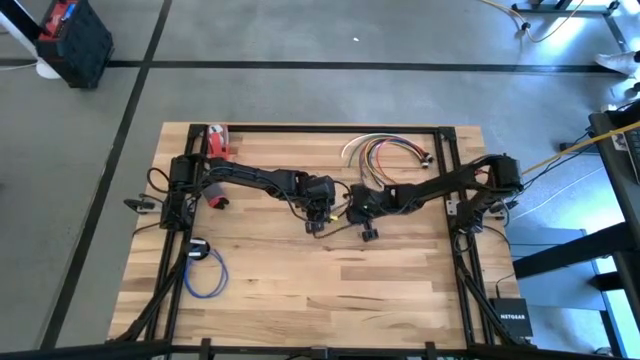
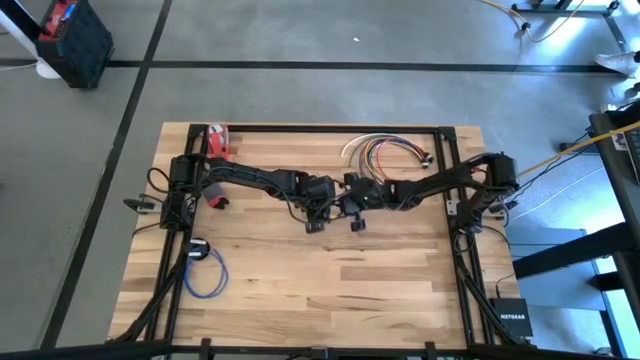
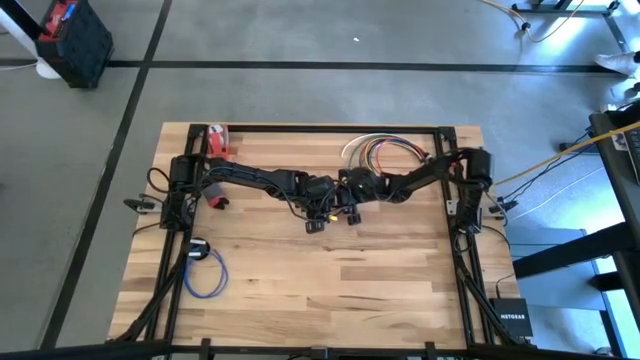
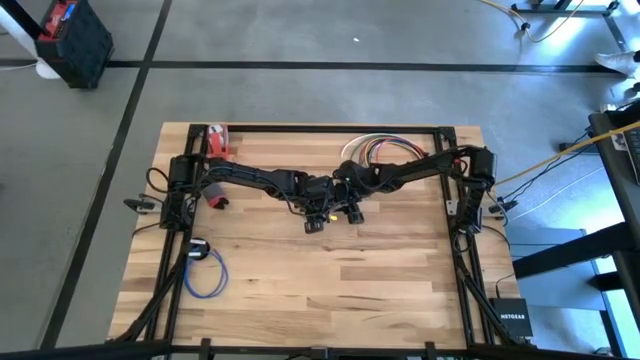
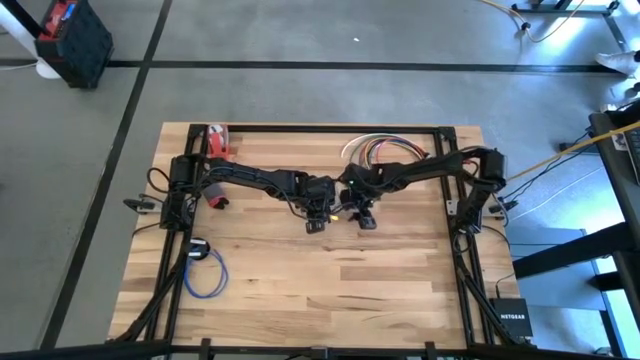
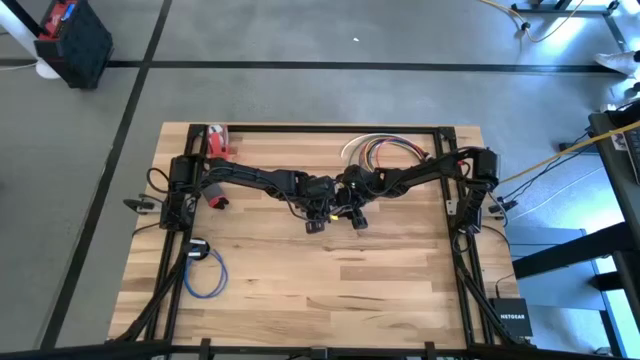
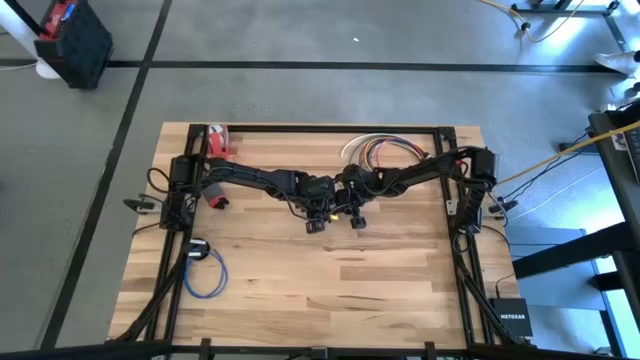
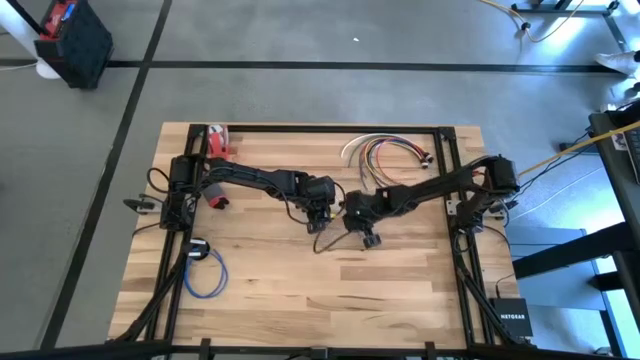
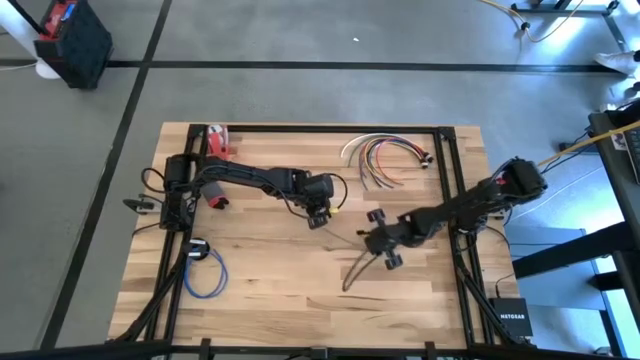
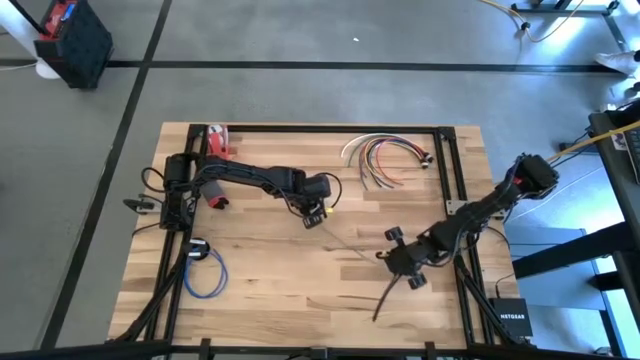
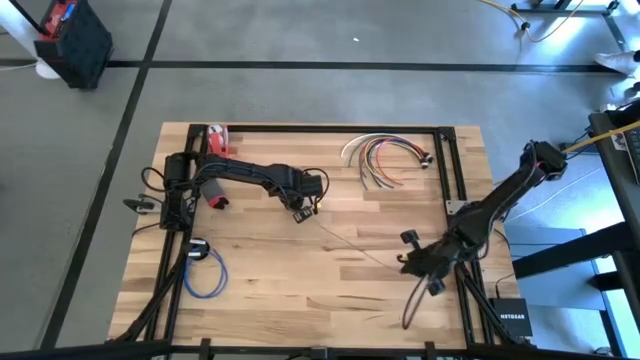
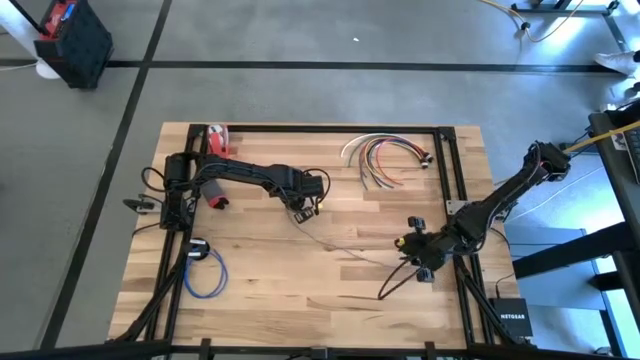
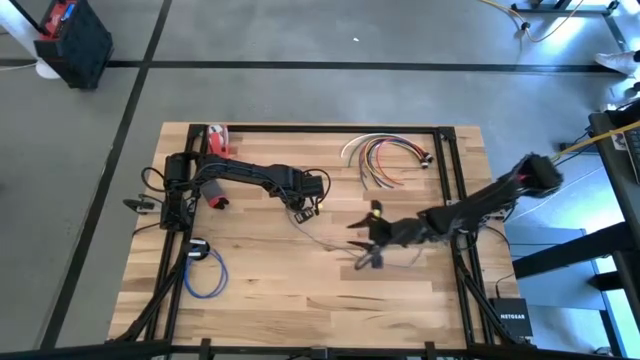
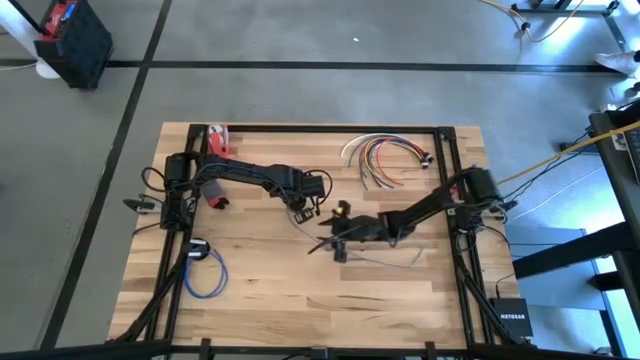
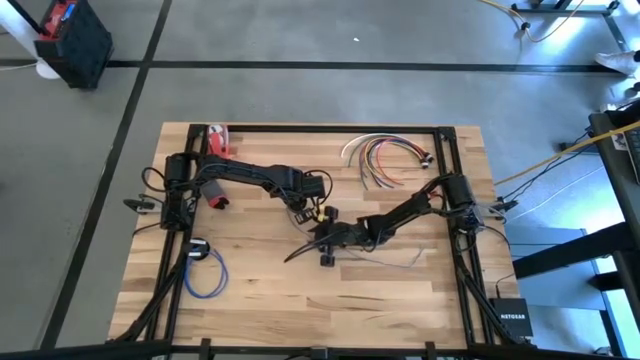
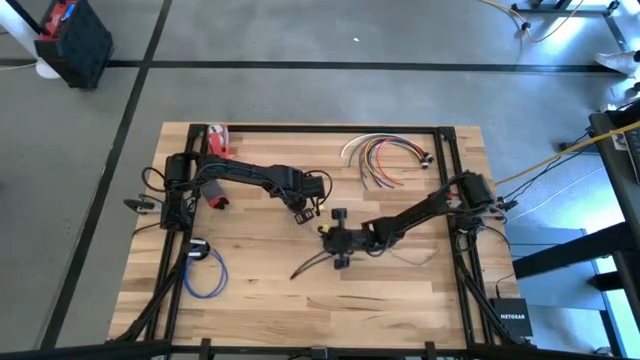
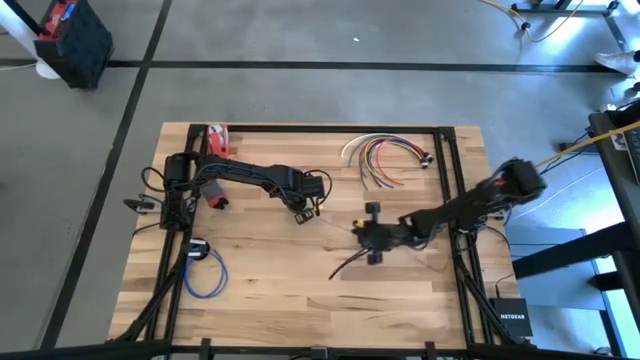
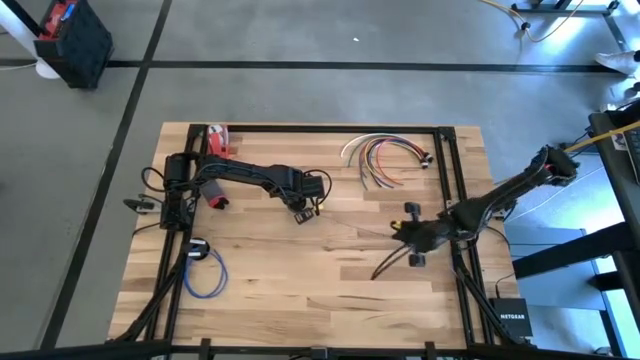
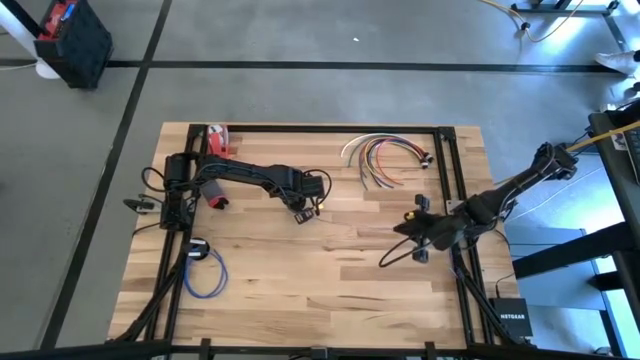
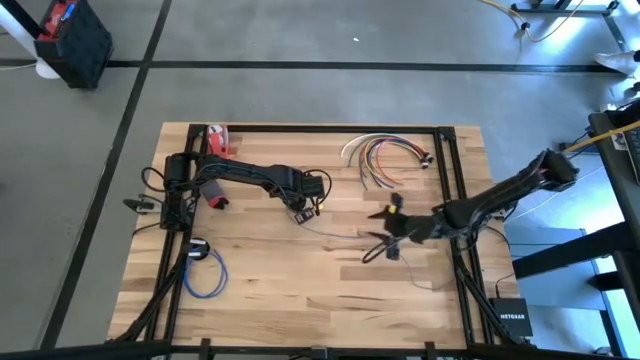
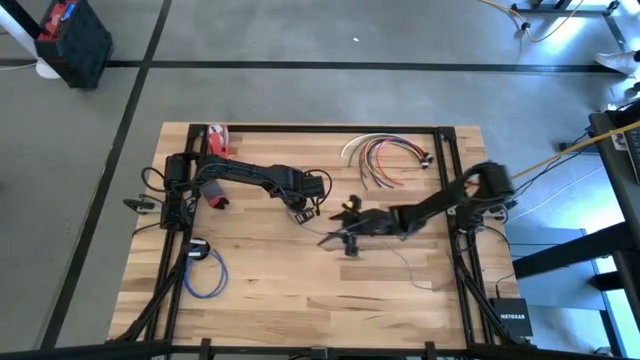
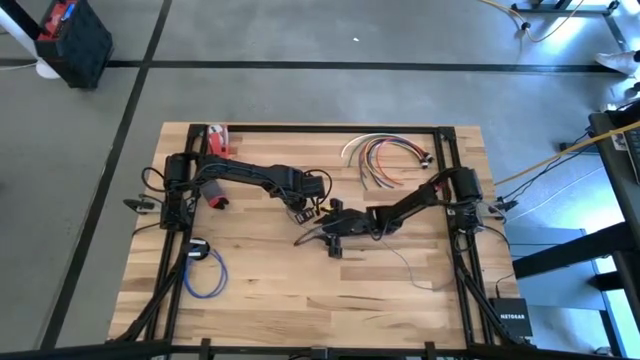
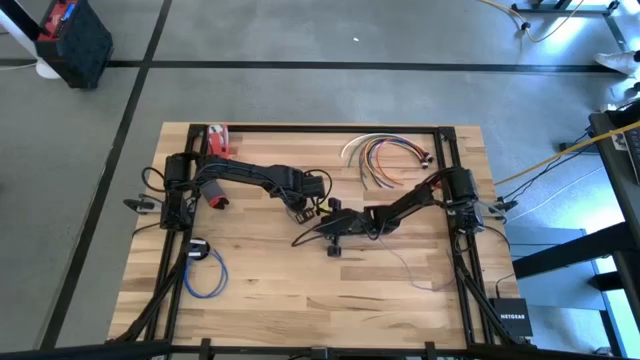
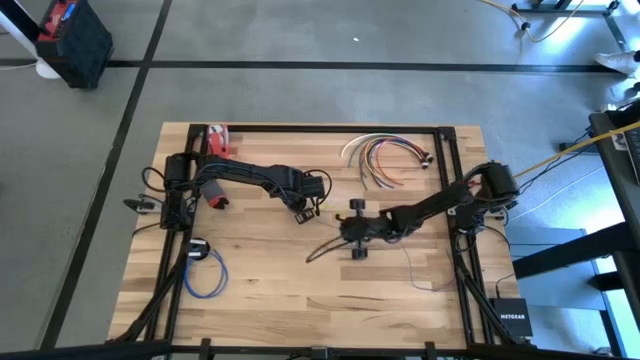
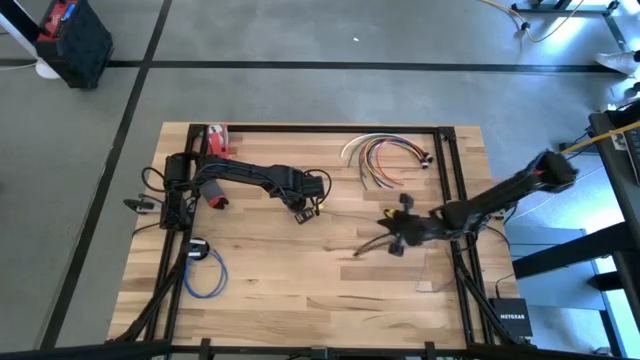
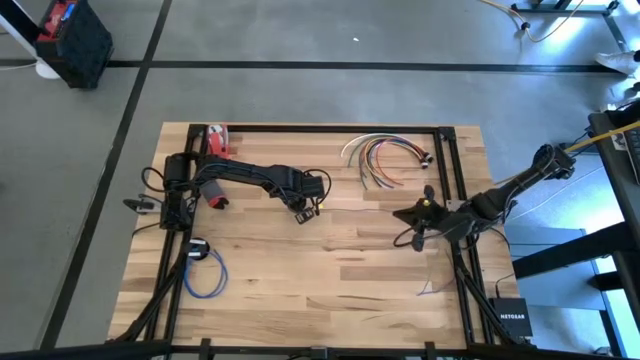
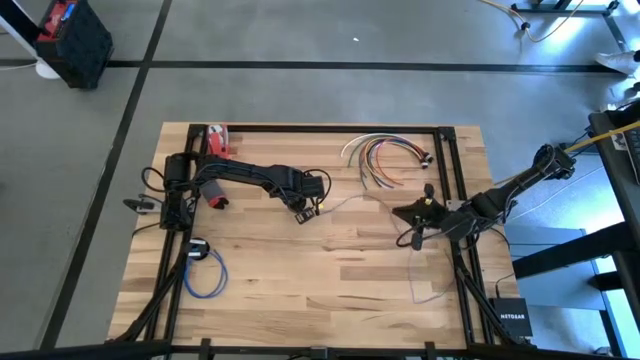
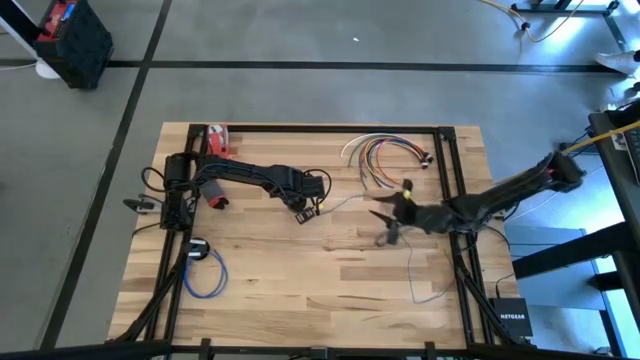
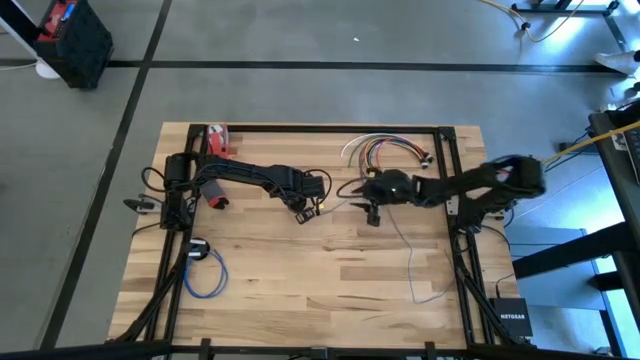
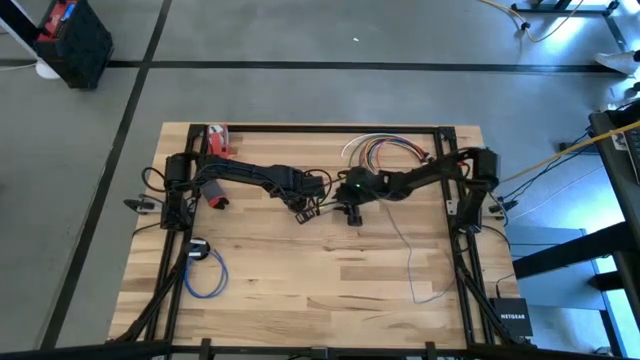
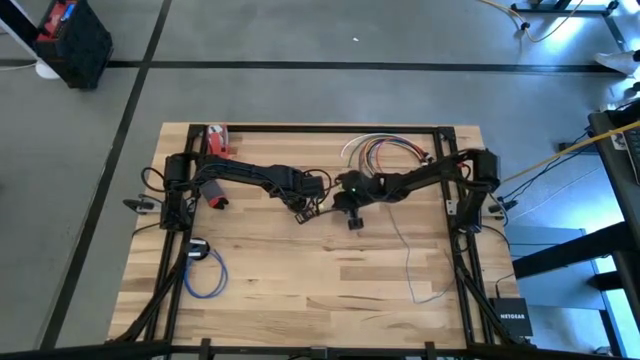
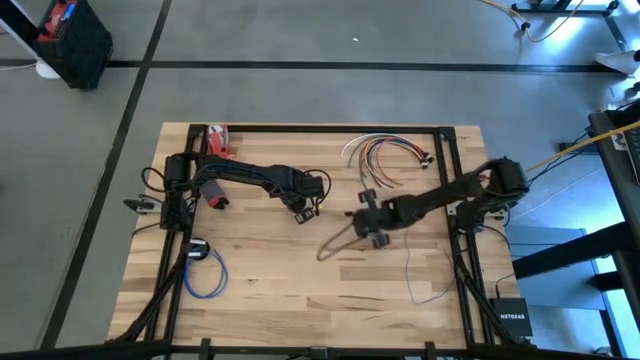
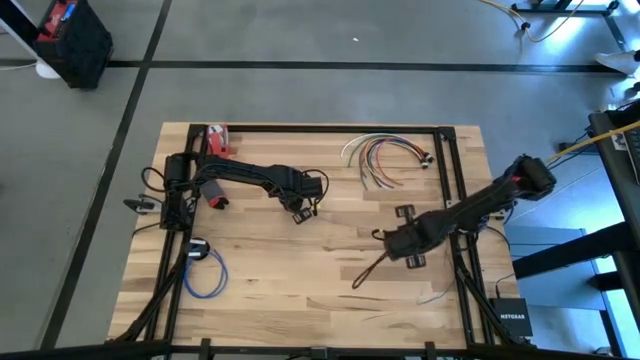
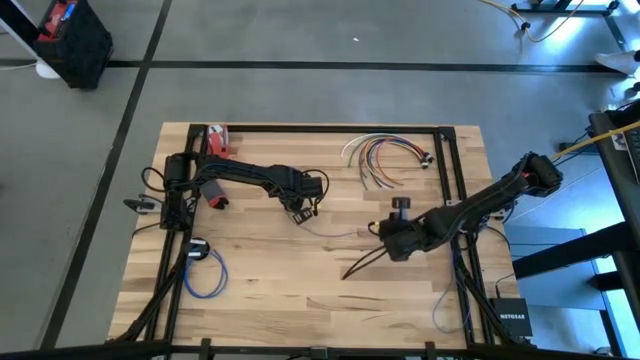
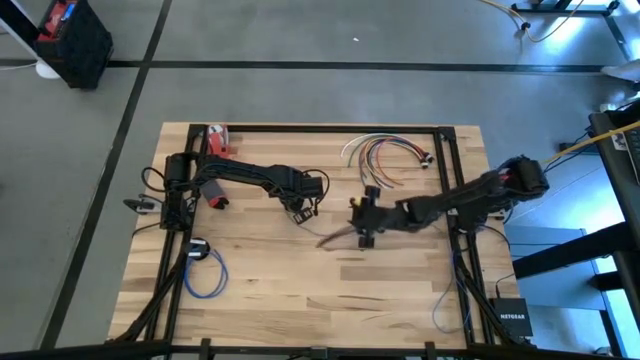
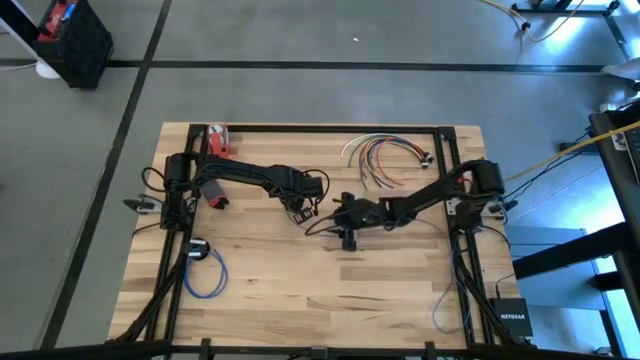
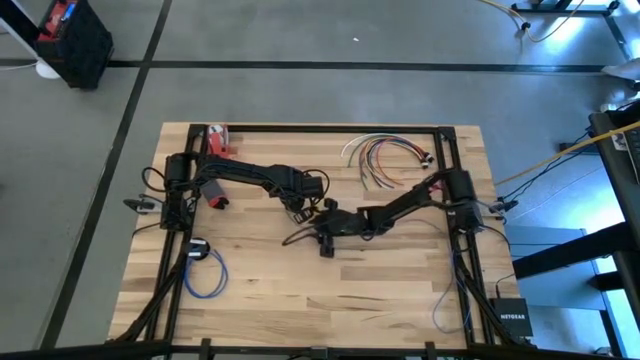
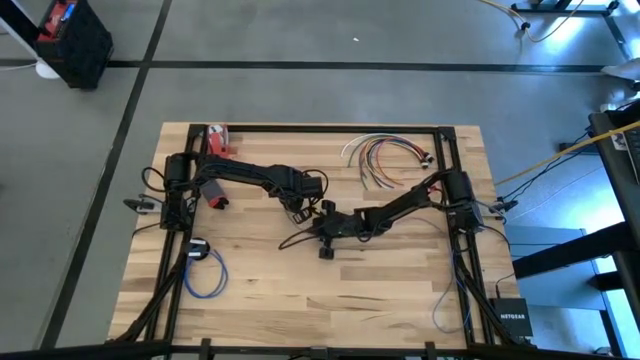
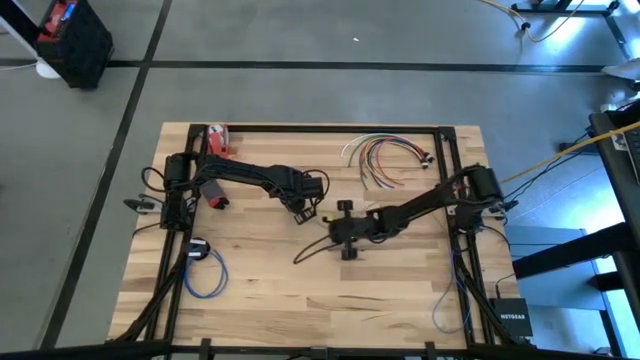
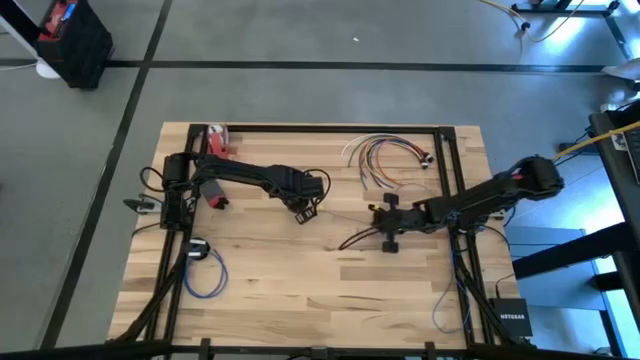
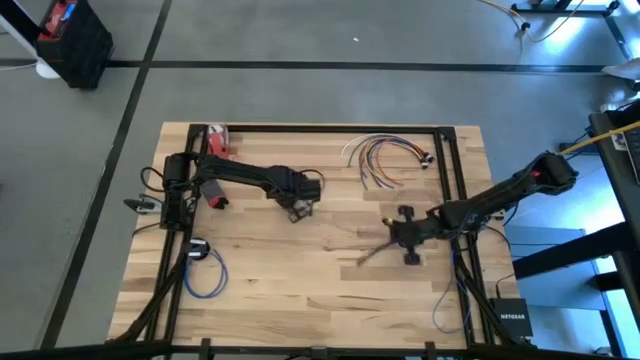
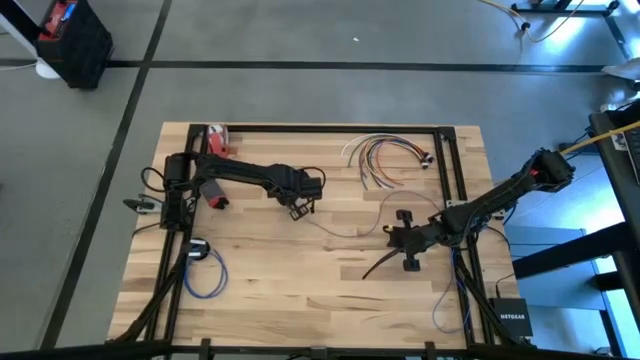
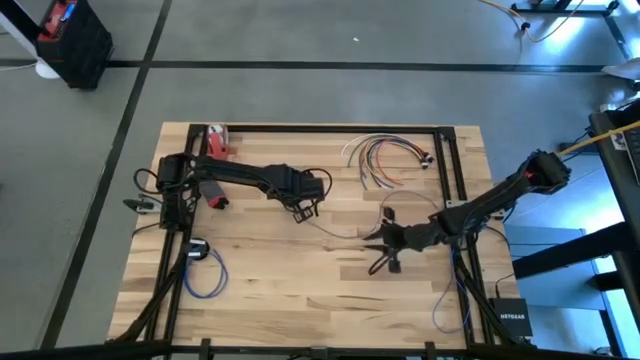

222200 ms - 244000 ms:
Task: Coil cords
Uncoil the blue cable wire from the spool
